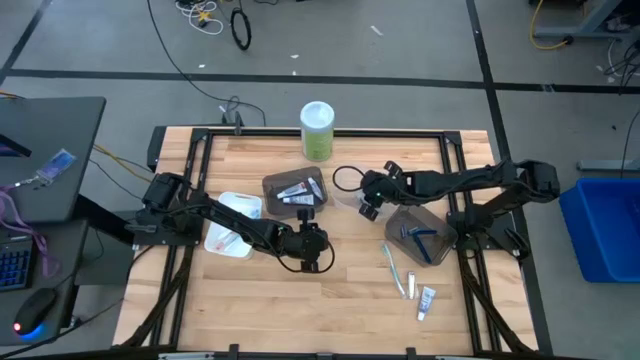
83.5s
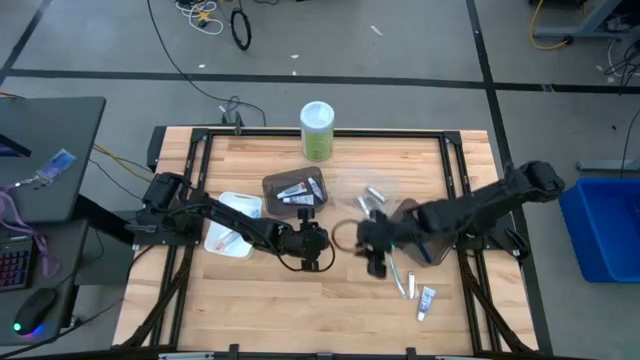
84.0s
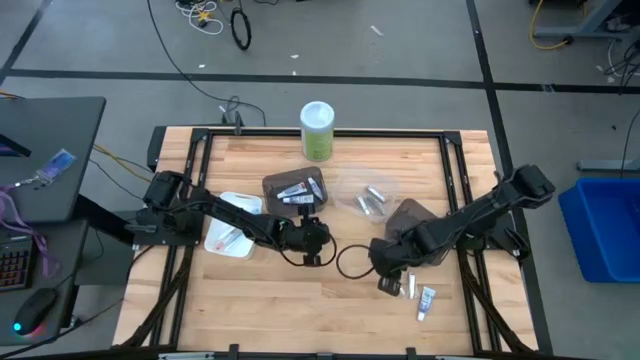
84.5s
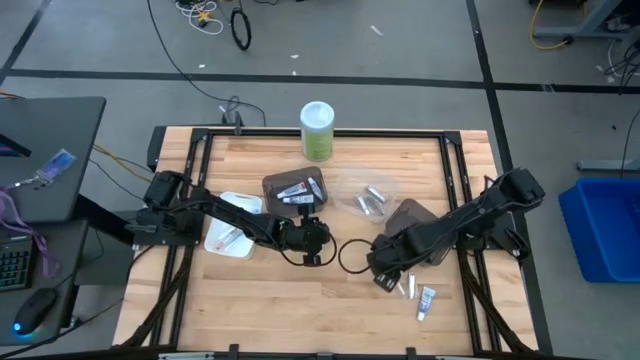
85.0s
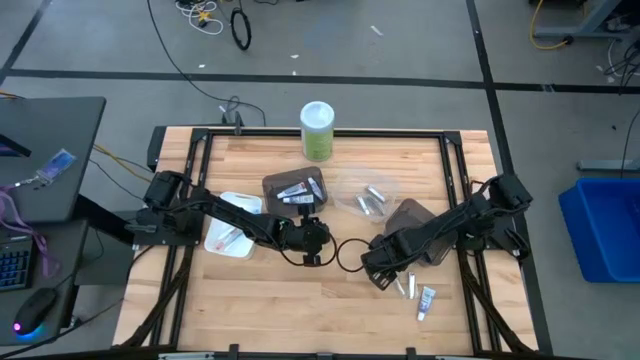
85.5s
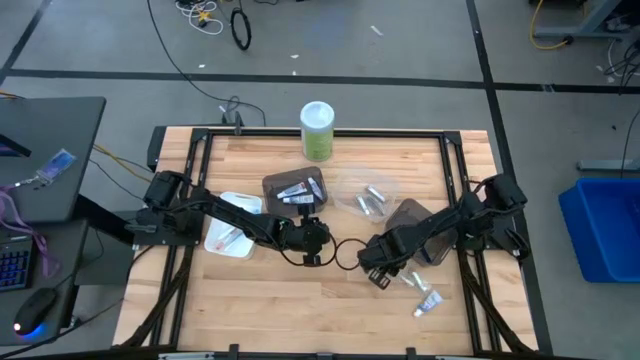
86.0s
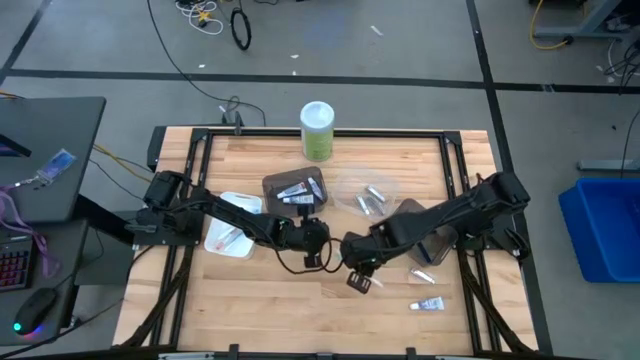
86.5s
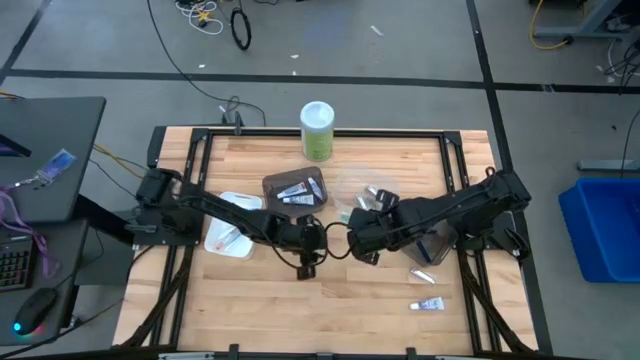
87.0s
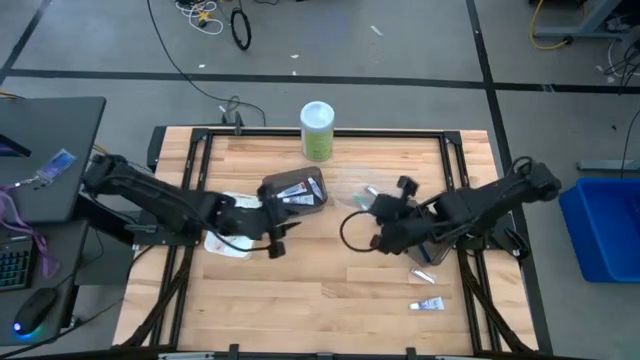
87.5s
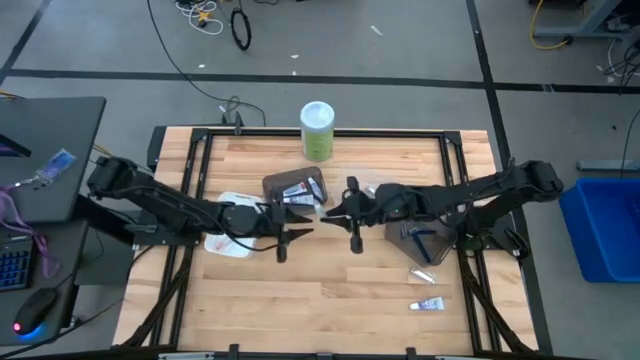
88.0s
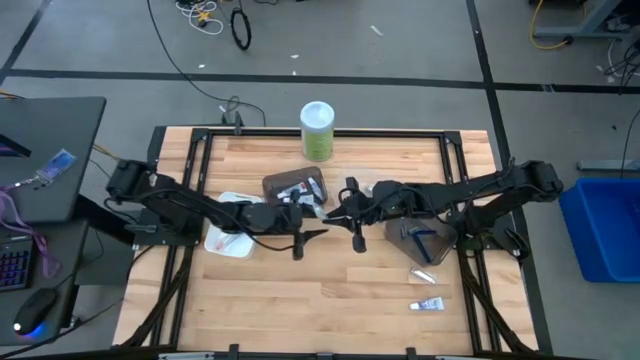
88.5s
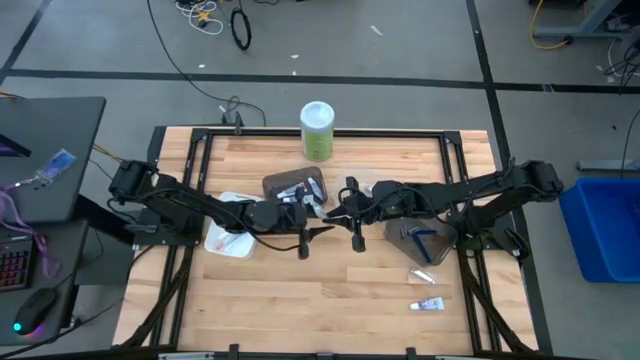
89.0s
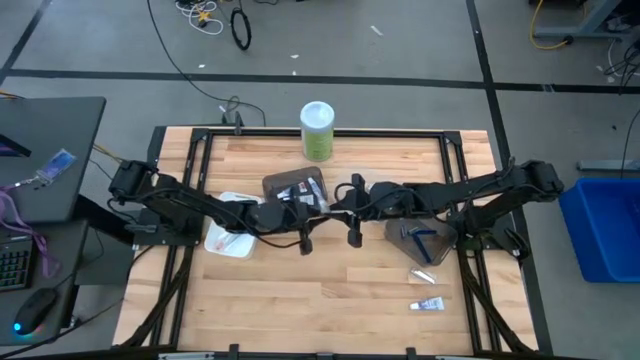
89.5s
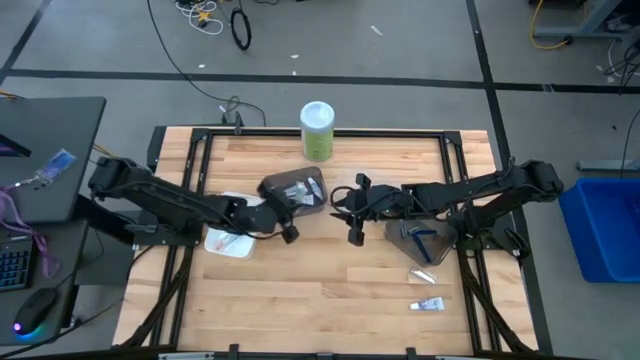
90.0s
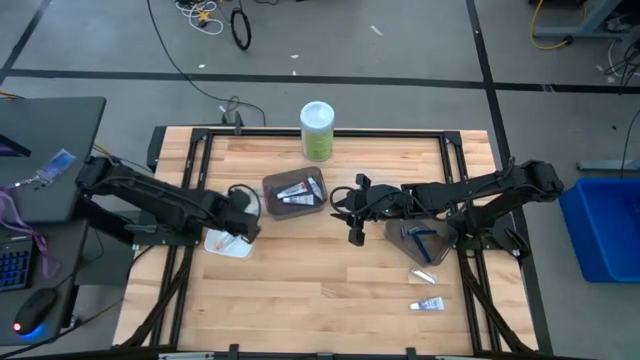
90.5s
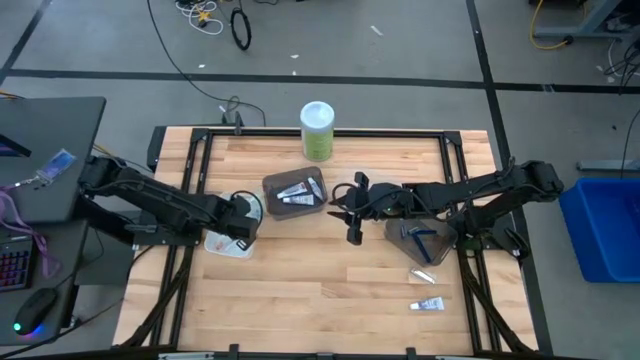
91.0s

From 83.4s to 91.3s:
Task: Pick & Place Travel size toiletries
Put the green toothbrush into the white bin

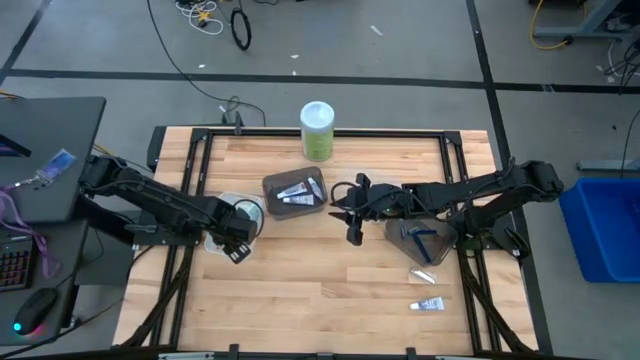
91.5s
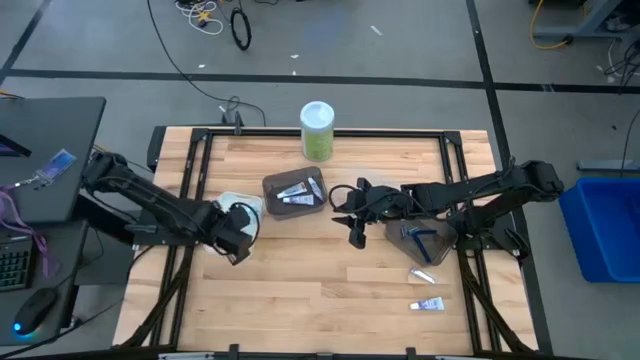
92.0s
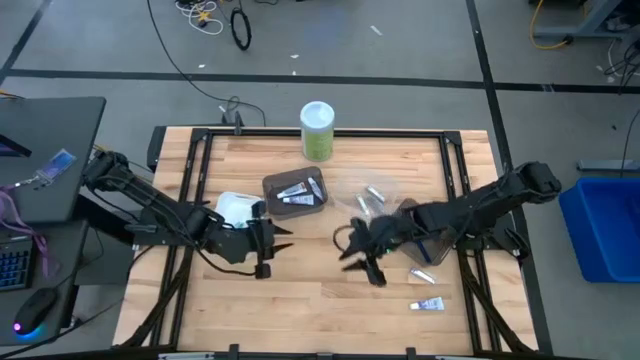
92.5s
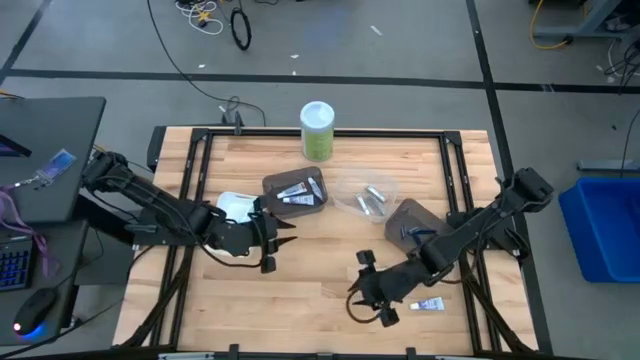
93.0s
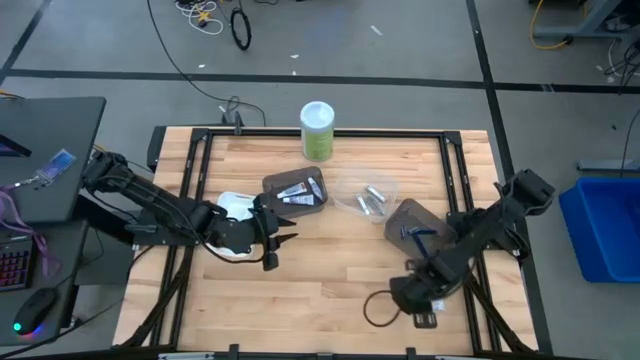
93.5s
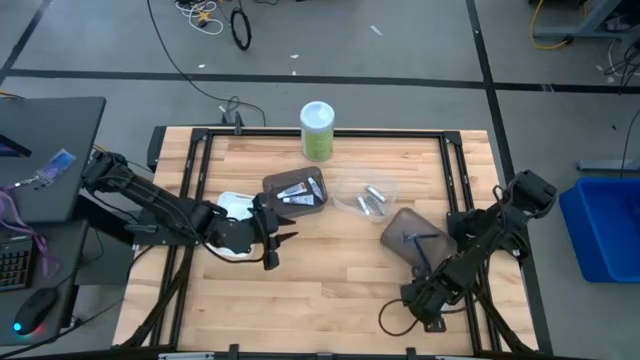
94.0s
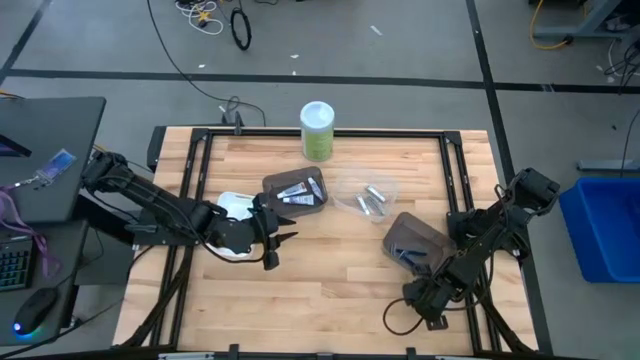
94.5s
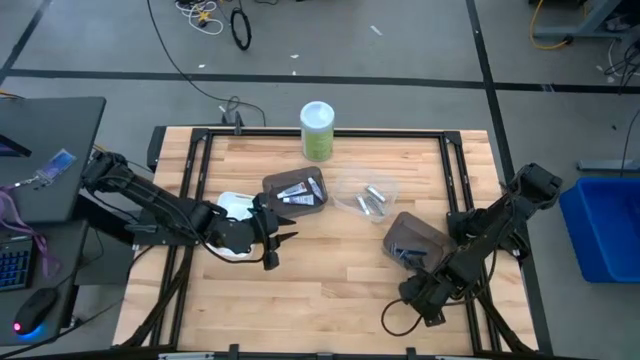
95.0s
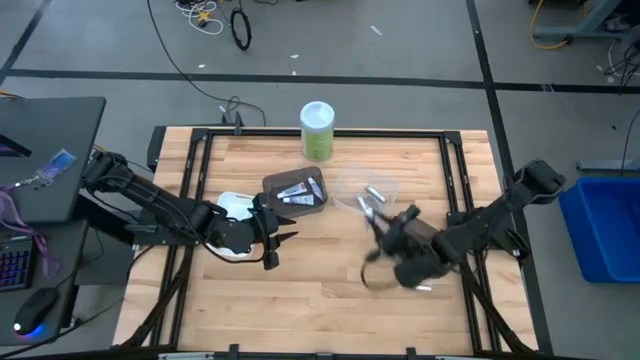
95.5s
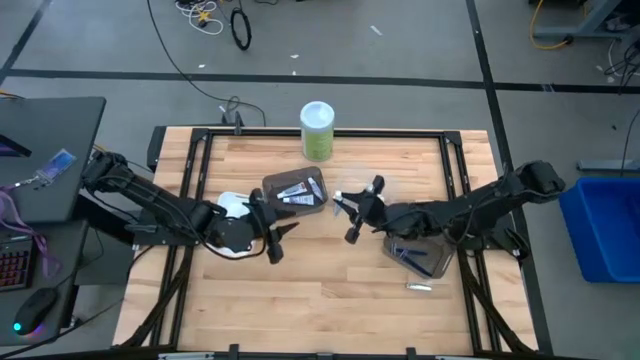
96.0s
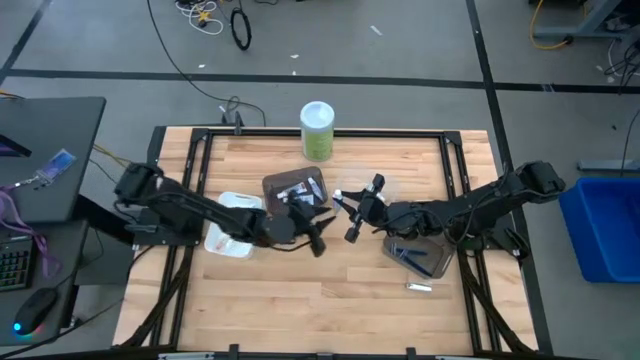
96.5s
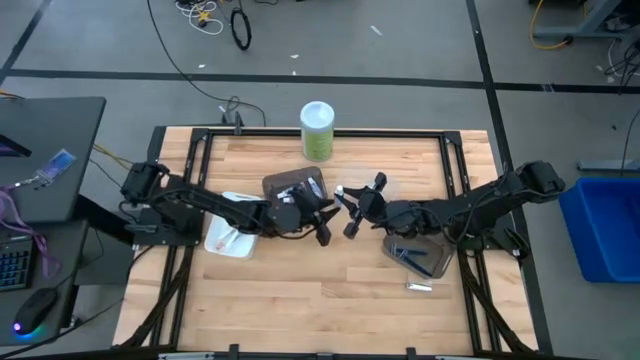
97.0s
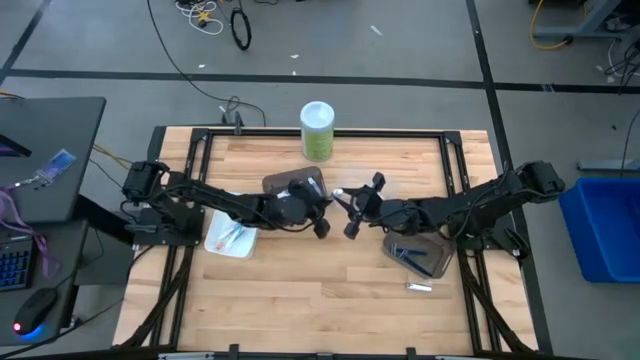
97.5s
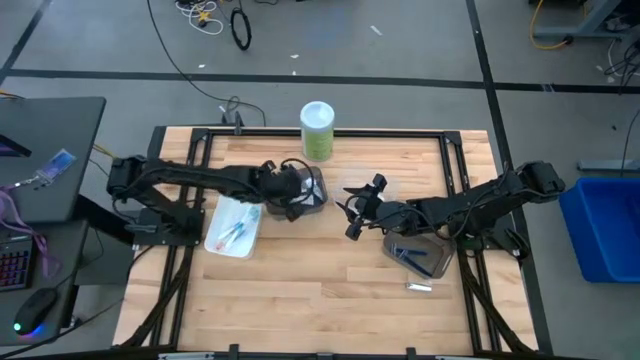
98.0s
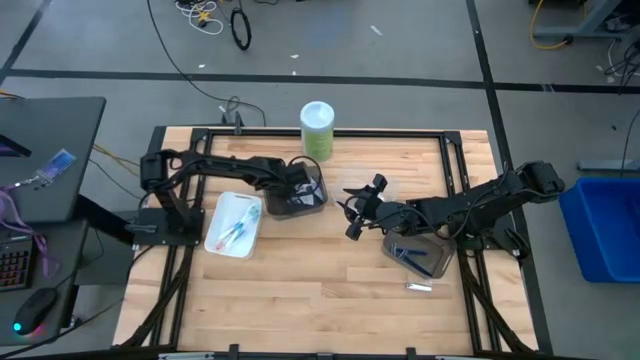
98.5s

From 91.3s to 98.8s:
Put the toothpaste into the left black bin

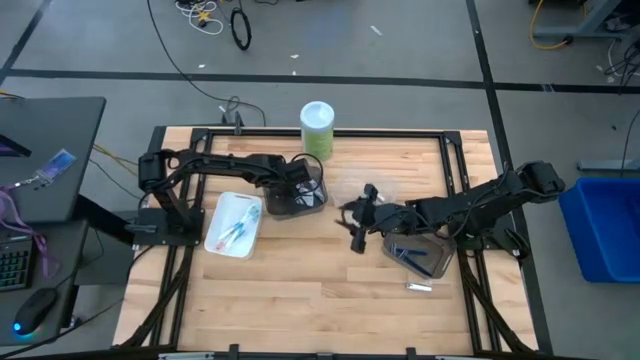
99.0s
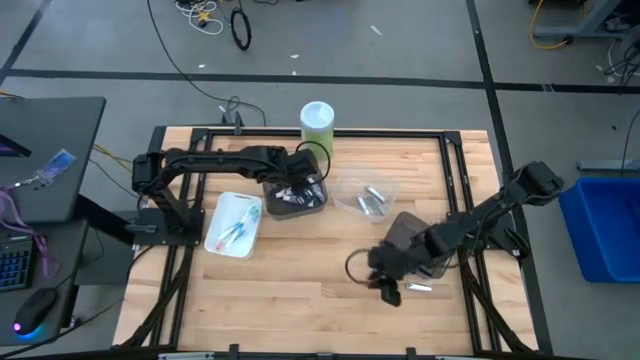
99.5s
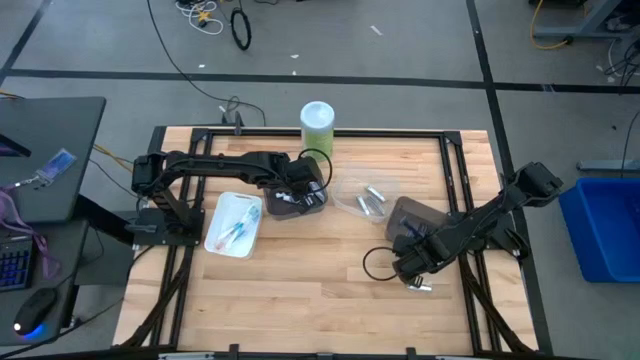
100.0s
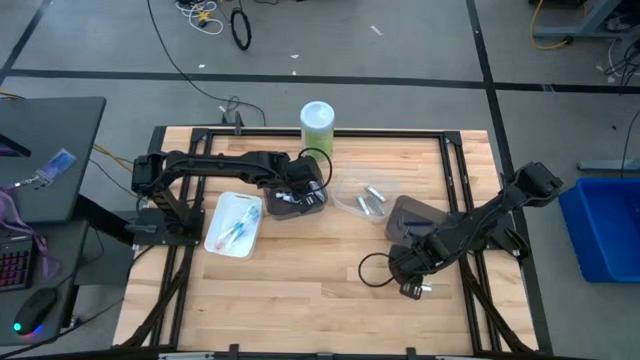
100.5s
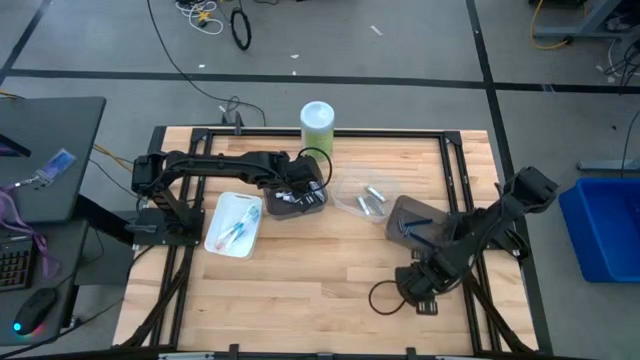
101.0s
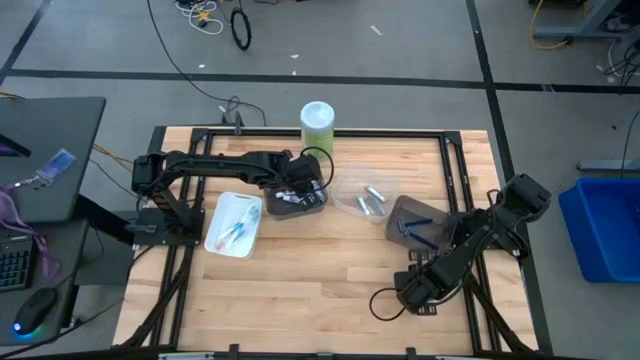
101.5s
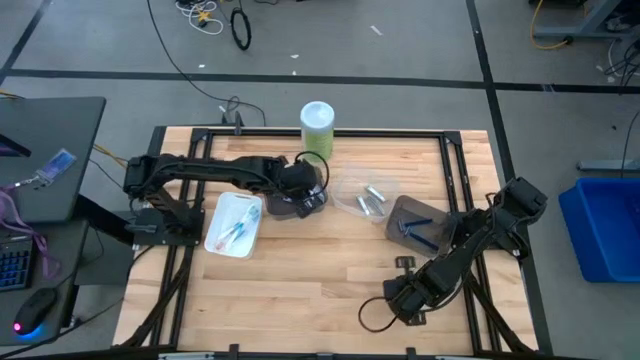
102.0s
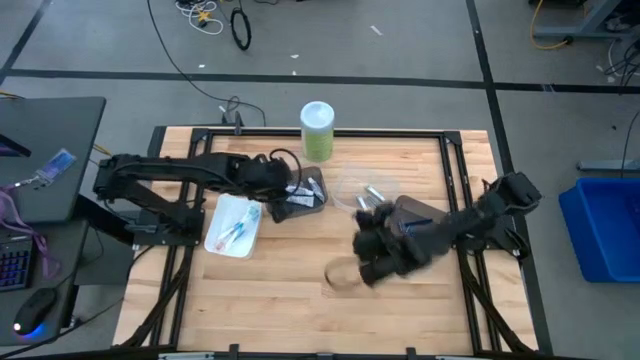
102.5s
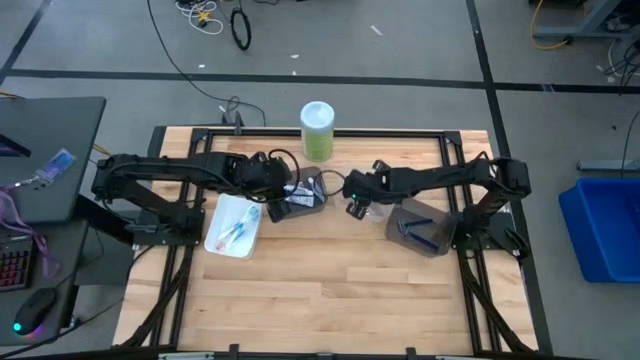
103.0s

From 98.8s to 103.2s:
Put the nail cutter into the transparent bin

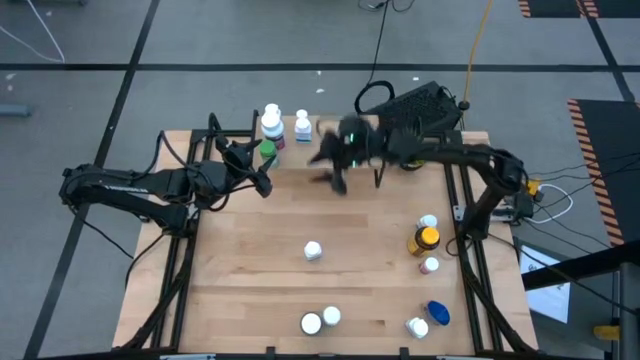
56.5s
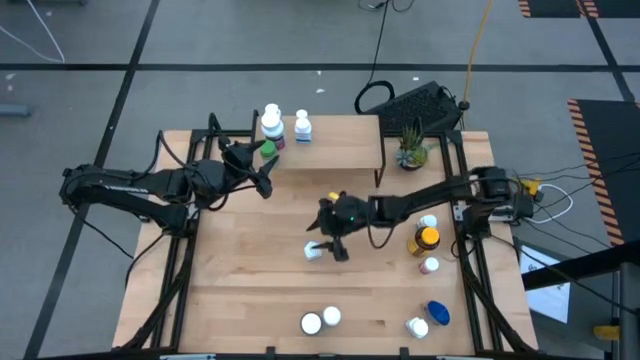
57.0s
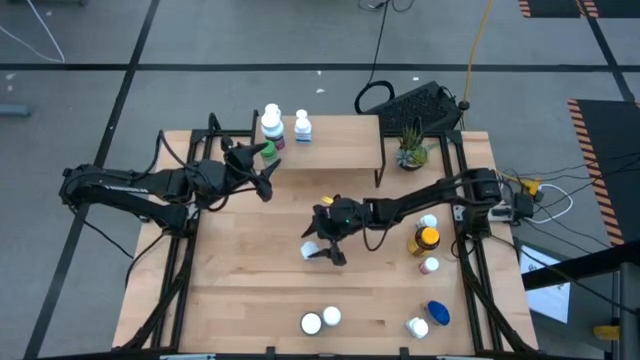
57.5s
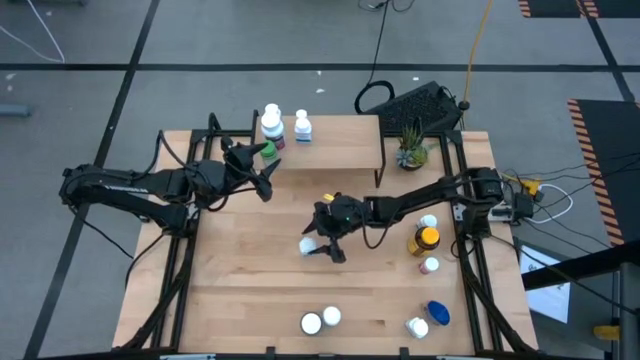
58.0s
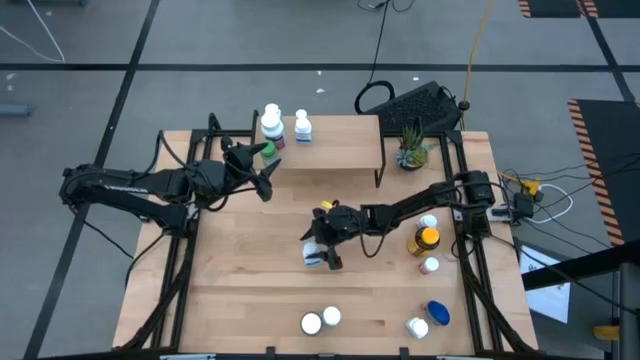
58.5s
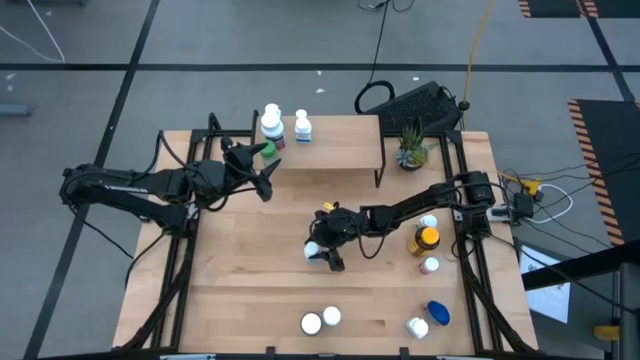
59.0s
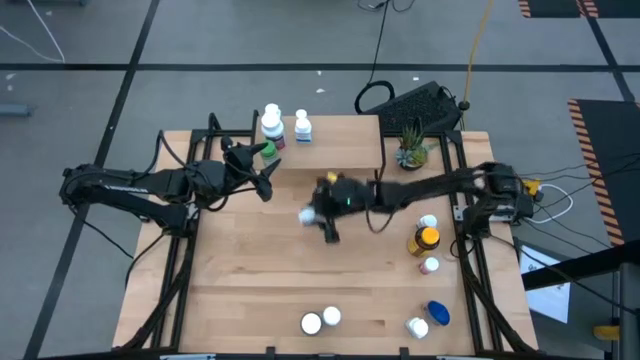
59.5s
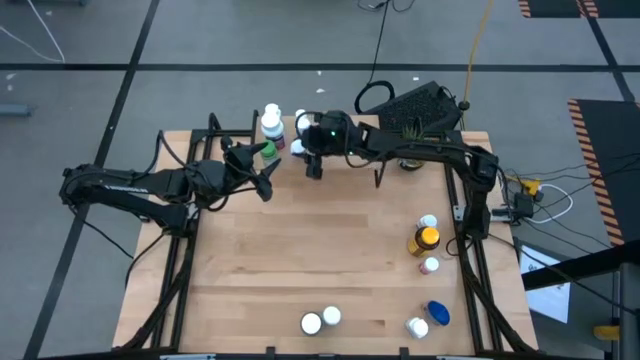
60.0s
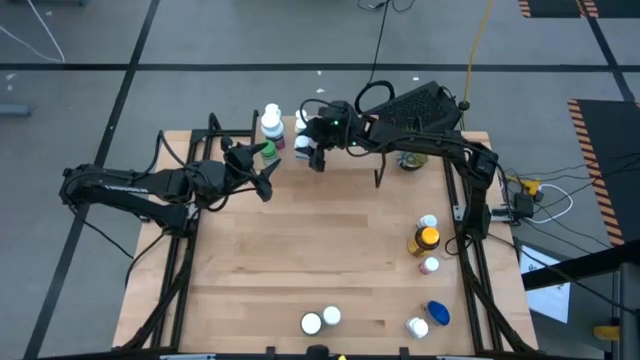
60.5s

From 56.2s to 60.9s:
Task: Pick and place medicine bottles onto shelf by color
Put the white pill bottle on the shelf
